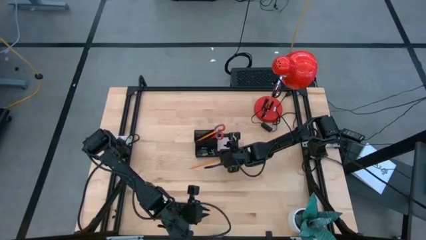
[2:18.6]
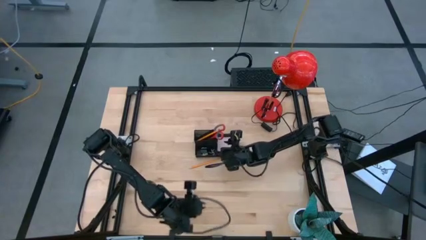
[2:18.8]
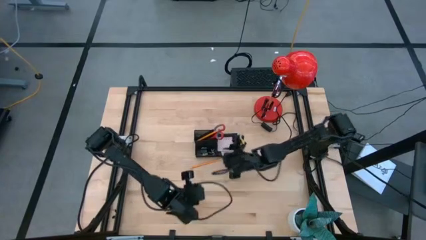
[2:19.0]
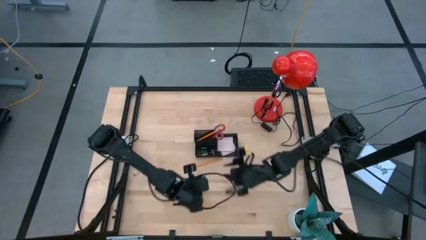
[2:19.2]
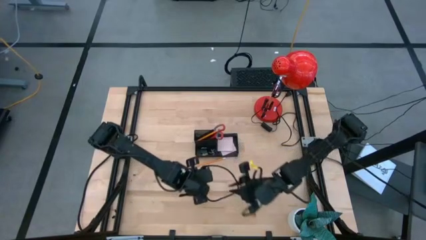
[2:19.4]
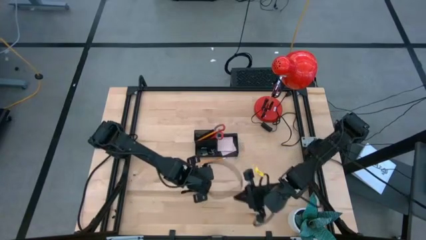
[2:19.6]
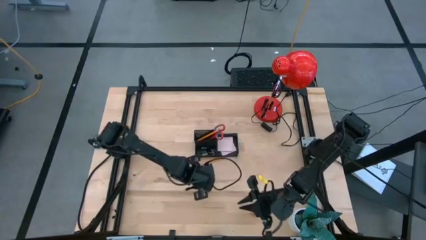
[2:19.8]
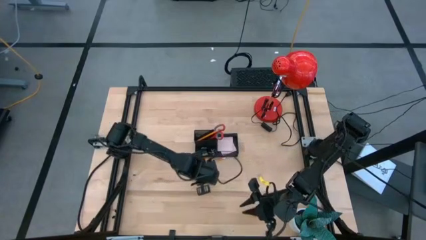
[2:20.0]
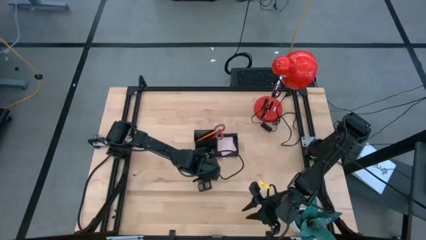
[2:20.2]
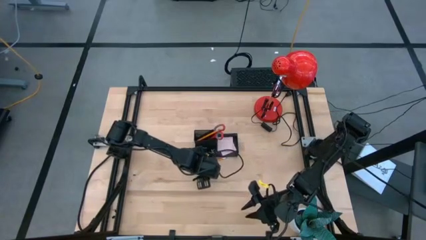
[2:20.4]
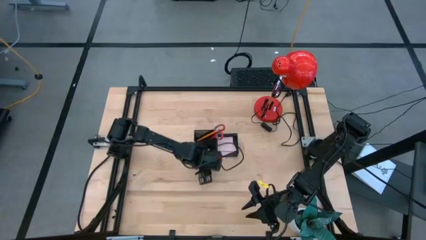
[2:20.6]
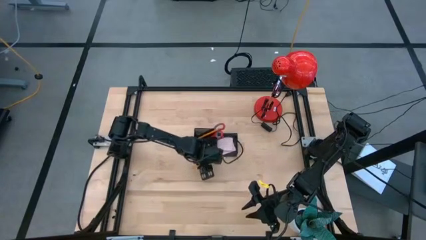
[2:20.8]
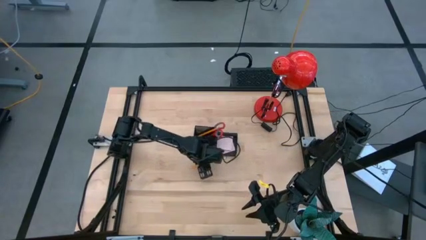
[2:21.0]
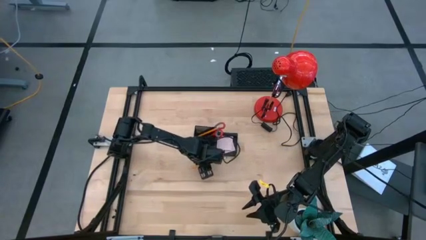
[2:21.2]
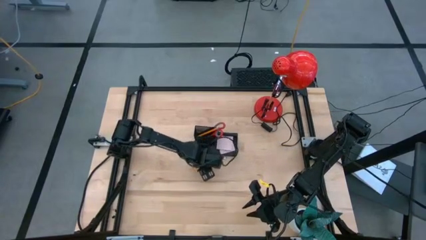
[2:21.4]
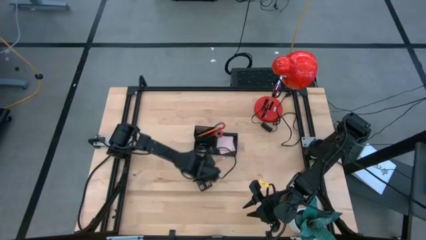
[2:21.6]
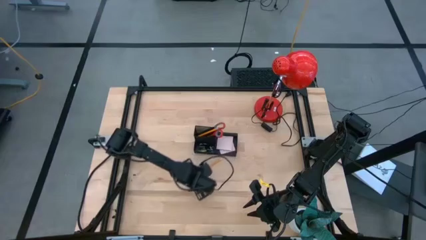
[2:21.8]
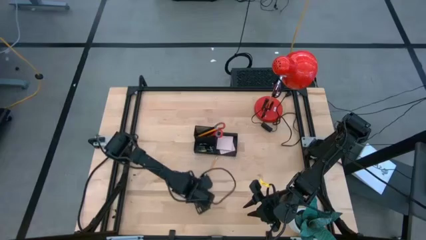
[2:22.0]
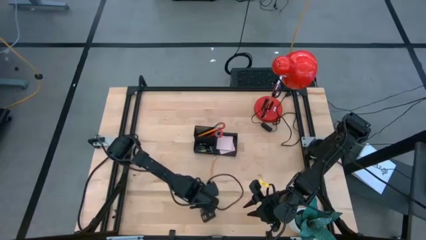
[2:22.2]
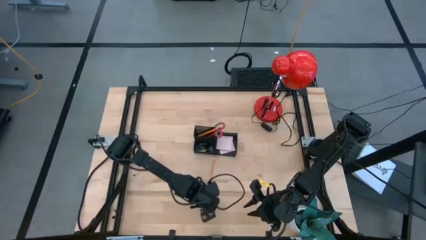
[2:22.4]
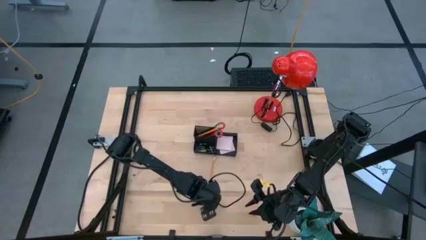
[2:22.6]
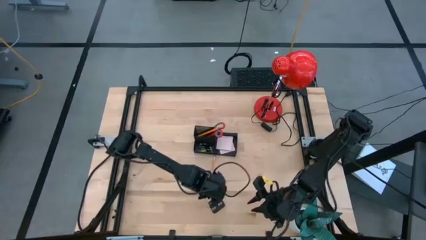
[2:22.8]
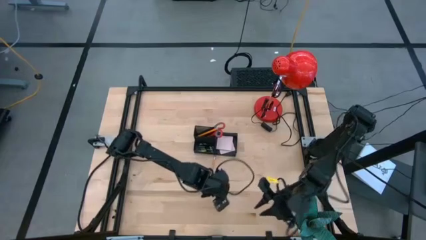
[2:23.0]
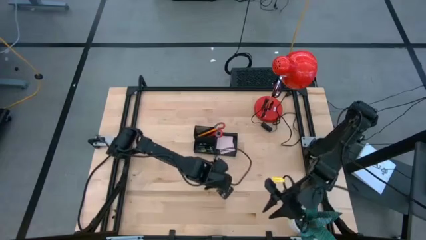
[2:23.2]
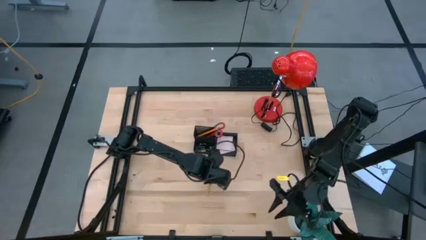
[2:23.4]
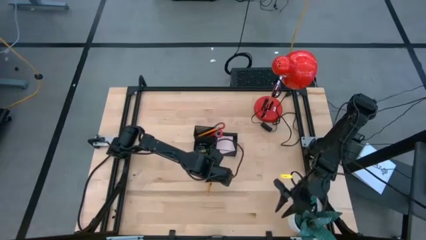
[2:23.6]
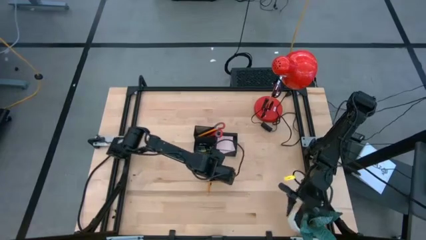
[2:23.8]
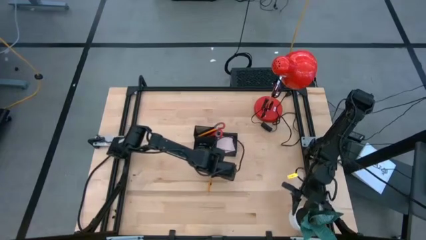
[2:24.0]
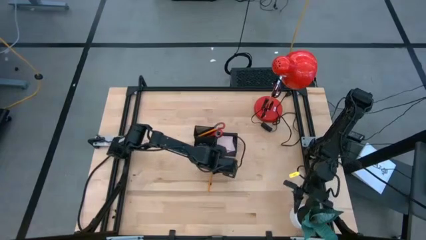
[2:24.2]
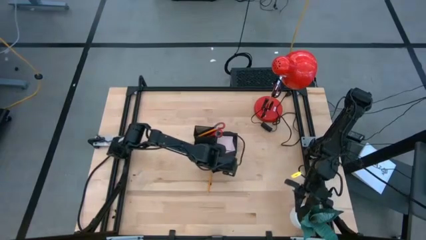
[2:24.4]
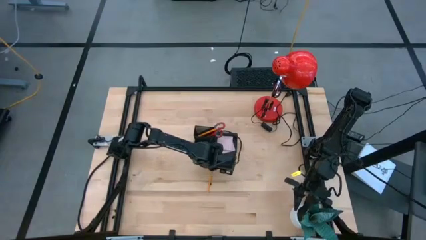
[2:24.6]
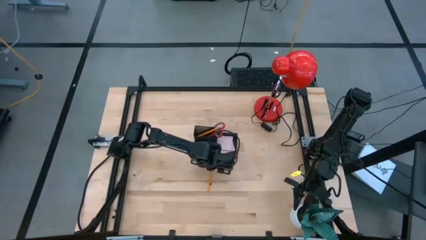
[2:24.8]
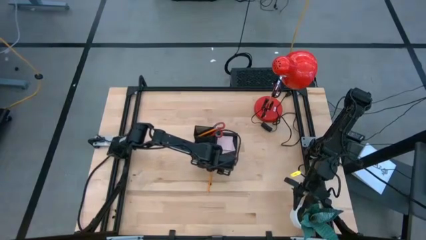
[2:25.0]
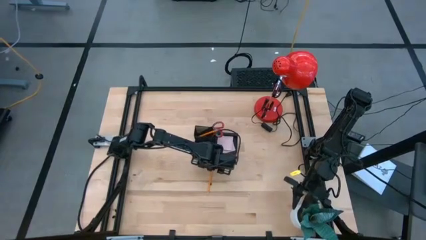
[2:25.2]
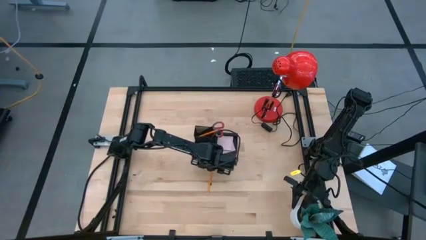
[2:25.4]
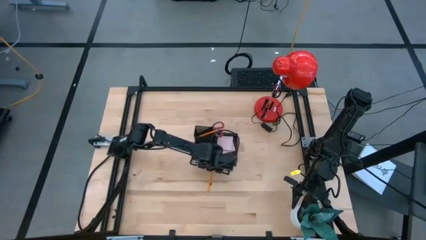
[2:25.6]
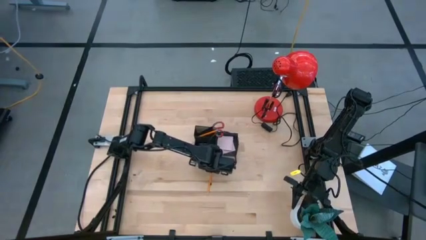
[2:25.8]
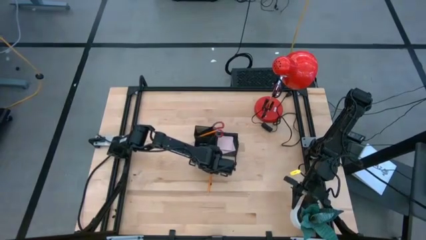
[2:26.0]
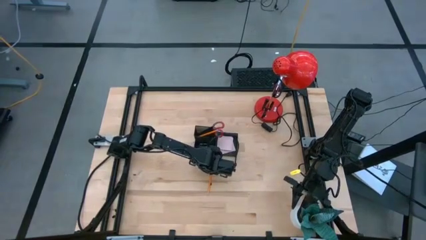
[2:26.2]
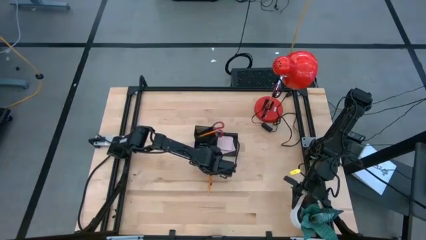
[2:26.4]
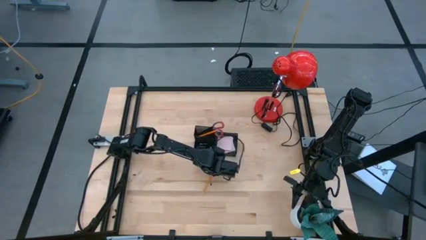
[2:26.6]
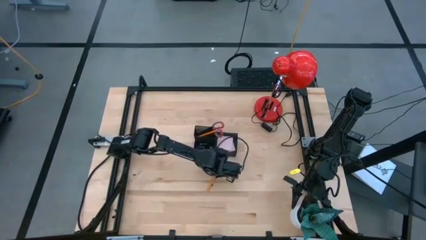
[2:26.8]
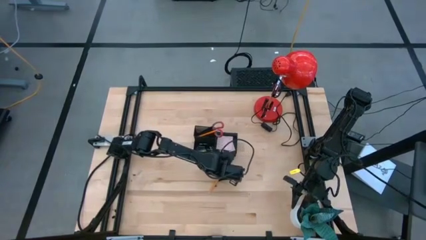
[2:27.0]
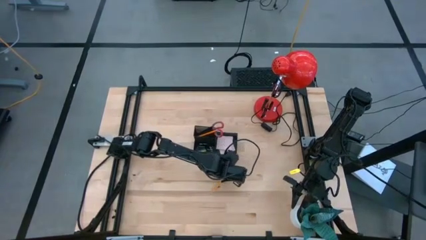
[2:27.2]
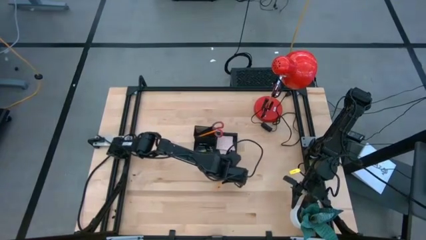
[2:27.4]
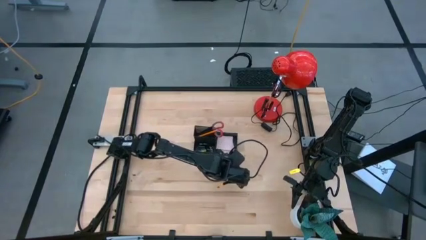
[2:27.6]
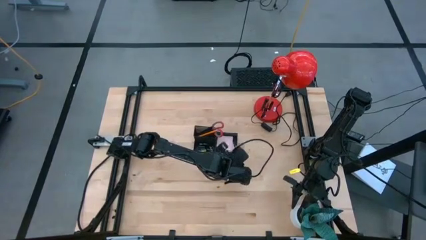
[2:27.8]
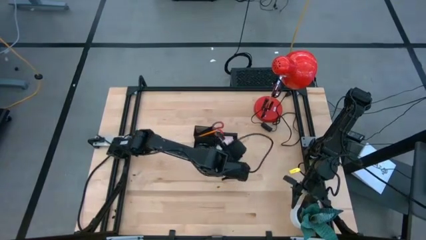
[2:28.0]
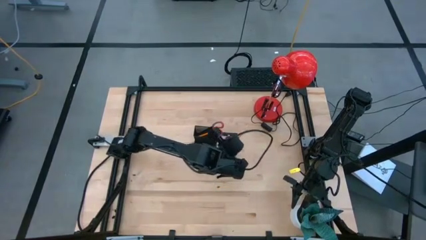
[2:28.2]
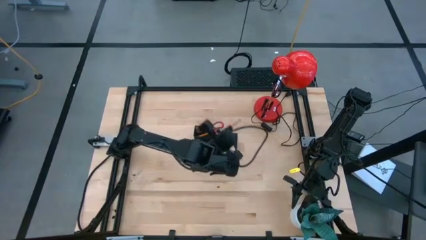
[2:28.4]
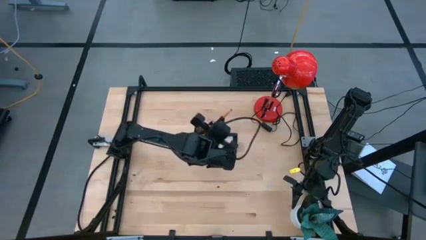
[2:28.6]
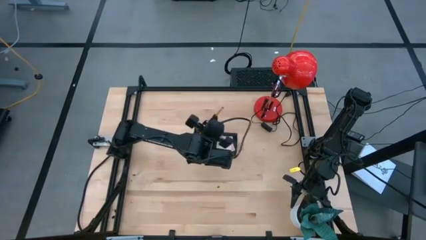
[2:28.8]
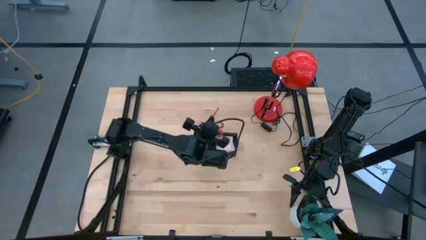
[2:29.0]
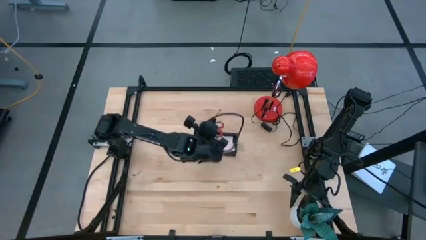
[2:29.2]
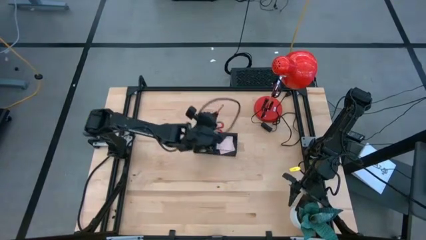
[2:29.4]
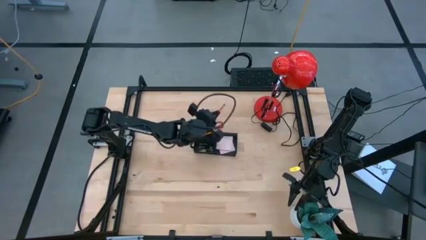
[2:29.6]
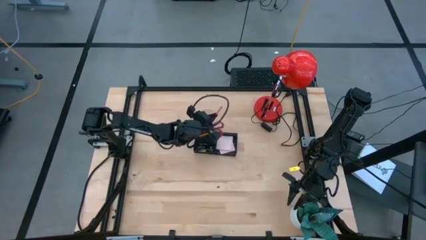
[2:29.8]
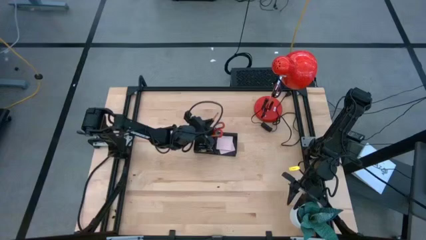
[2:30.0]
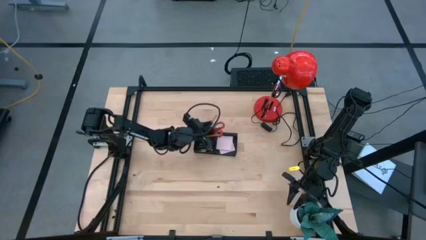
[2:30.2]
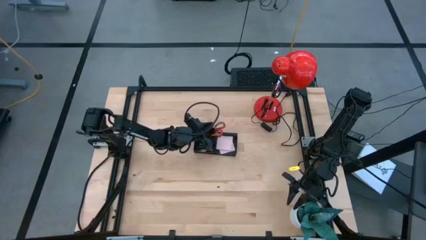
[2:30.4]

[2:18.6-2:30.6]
Task: Pick and place office supplies into organizer
Put the pencil into the desk organizer
